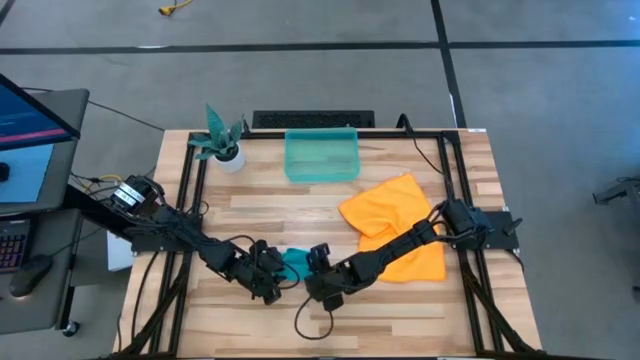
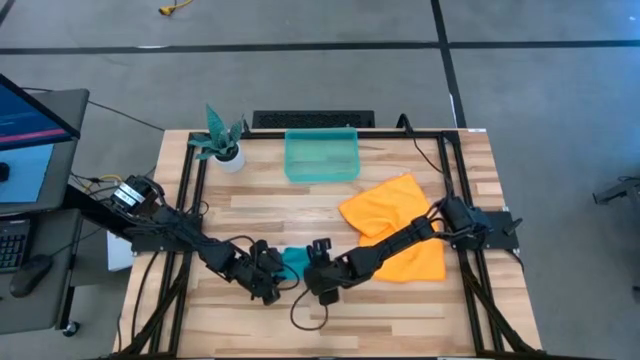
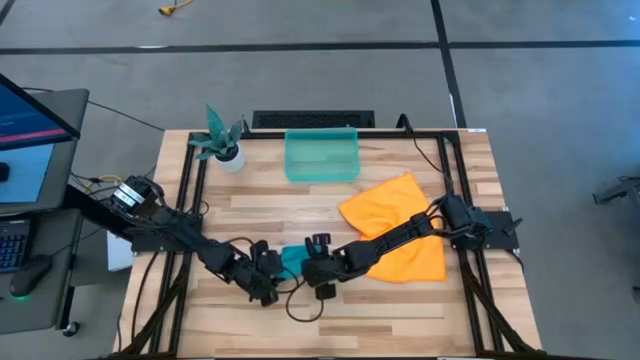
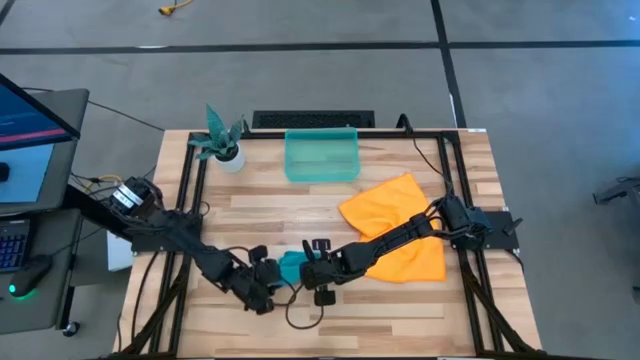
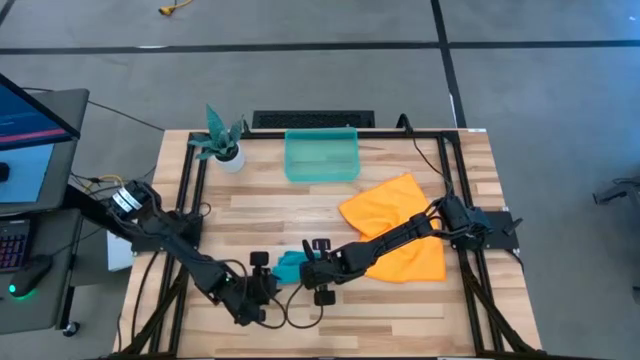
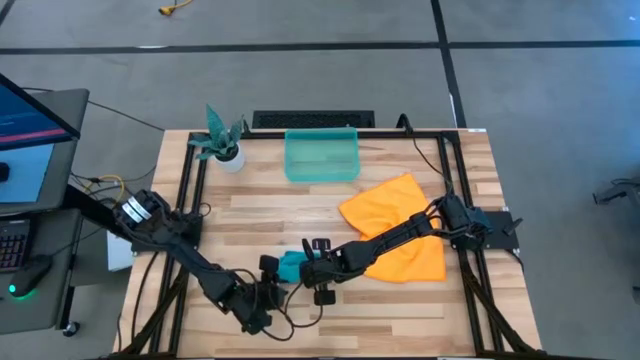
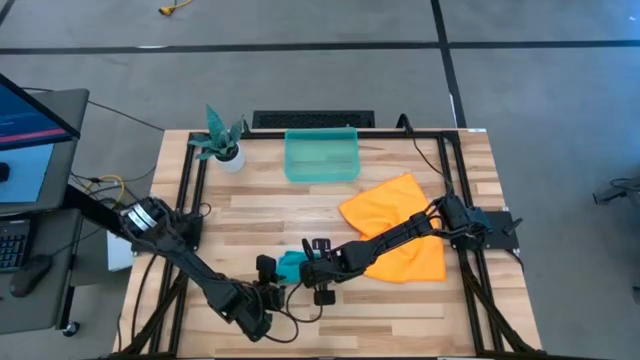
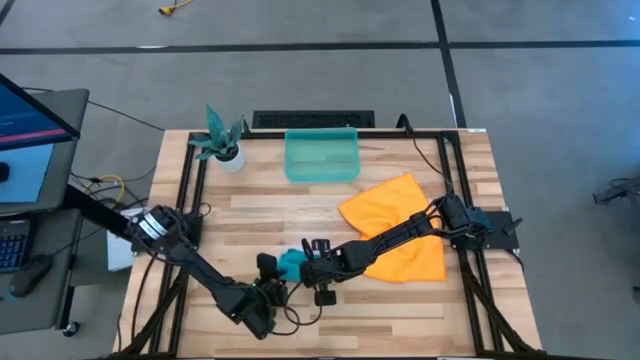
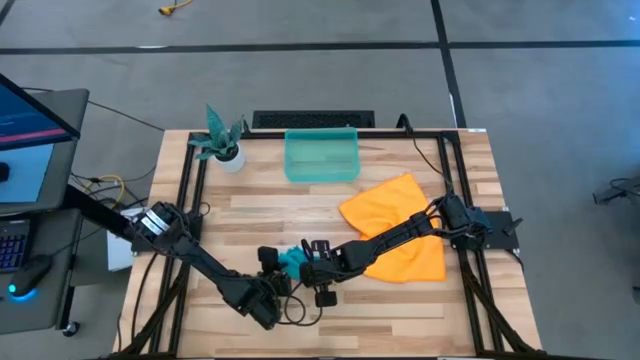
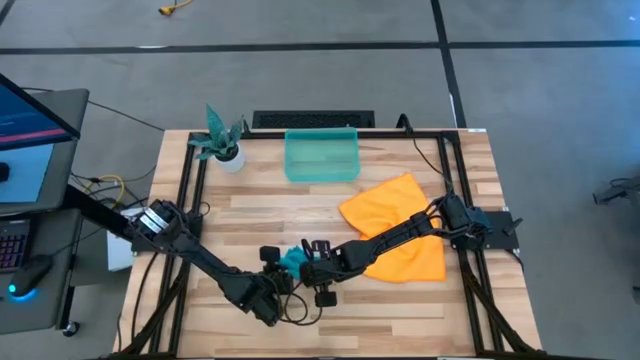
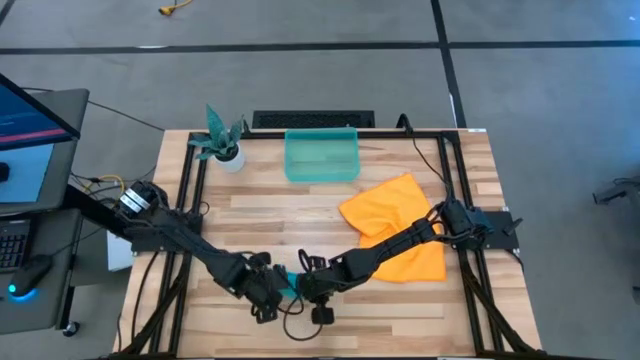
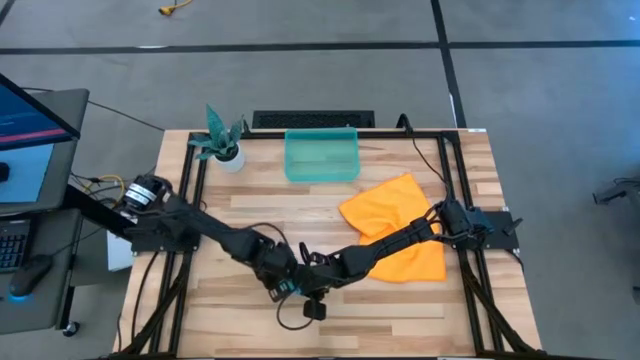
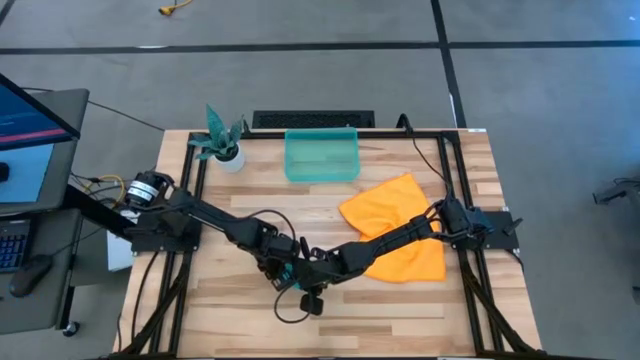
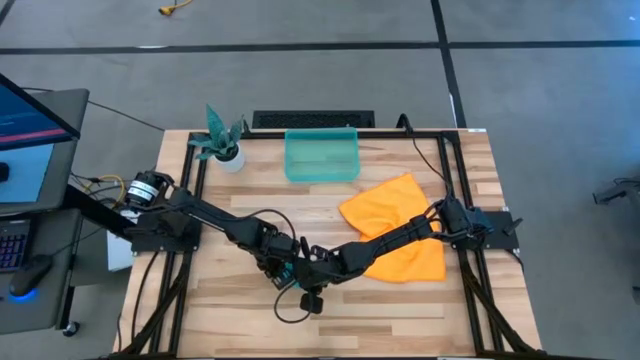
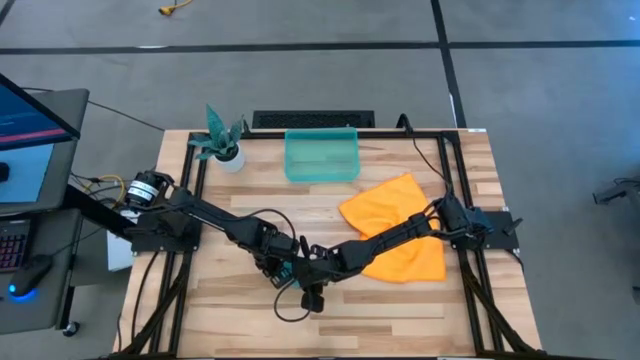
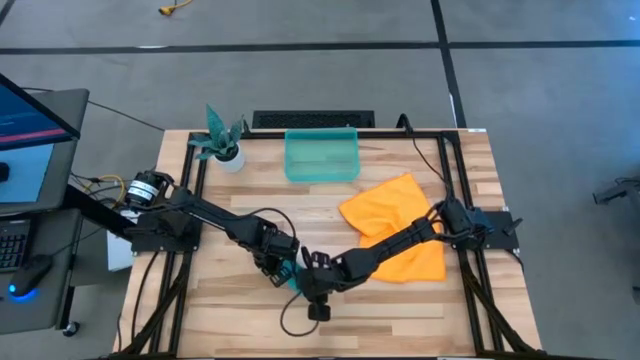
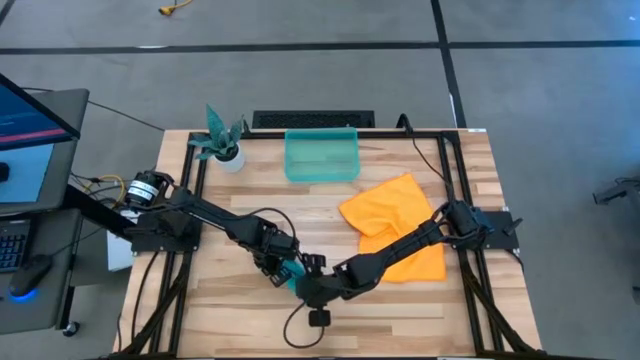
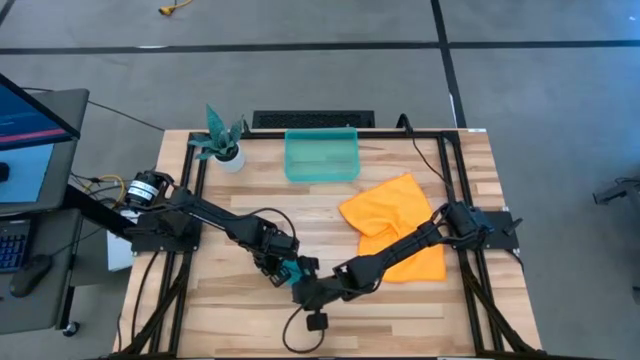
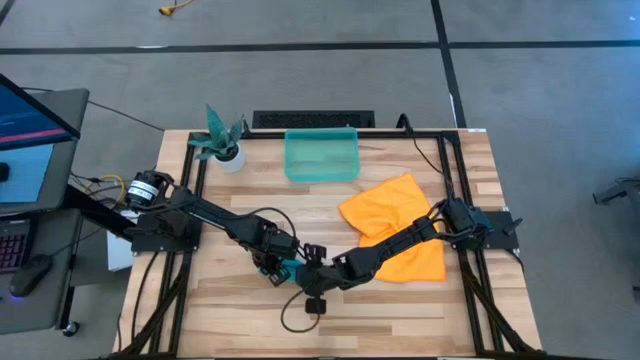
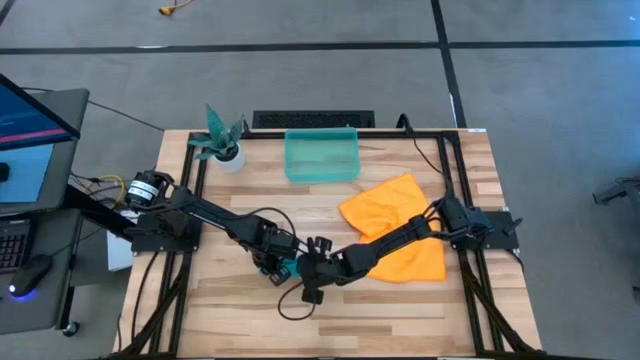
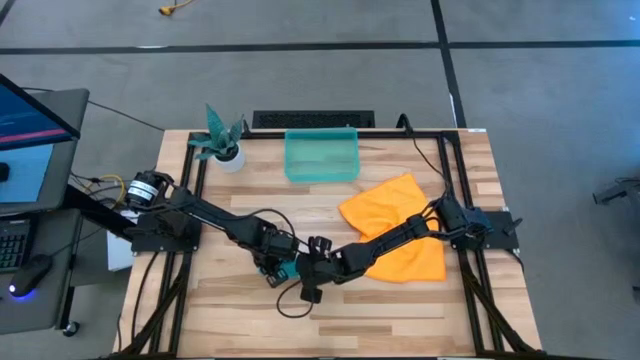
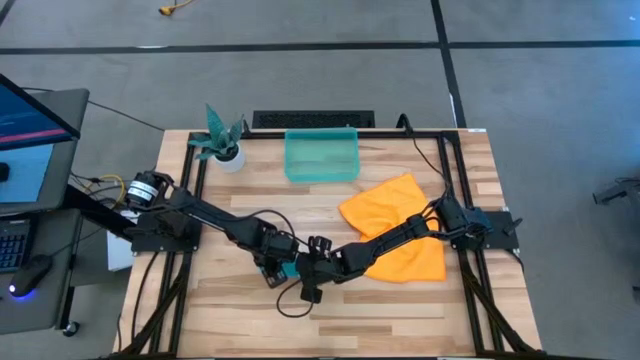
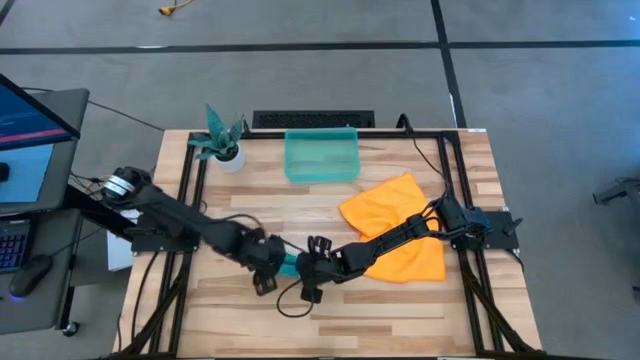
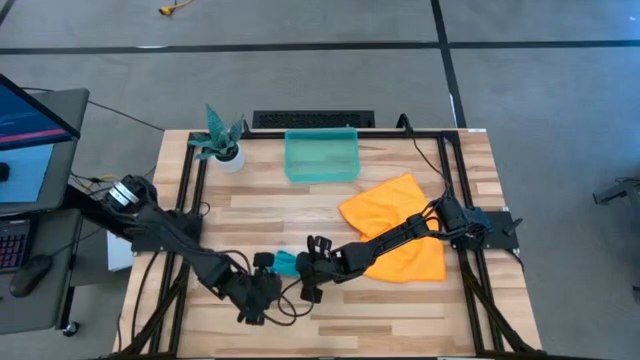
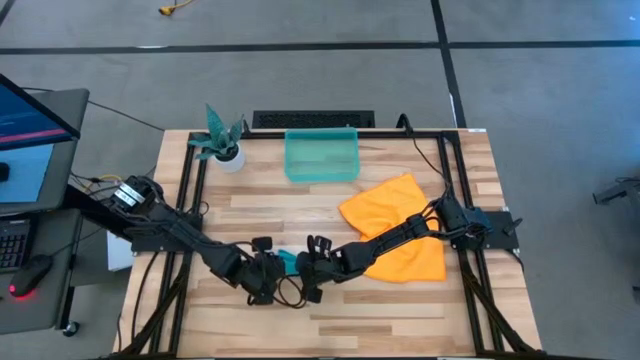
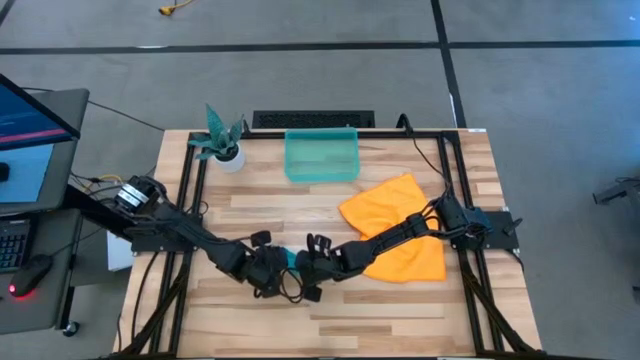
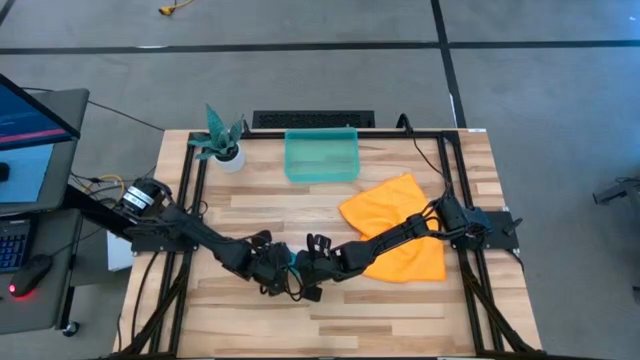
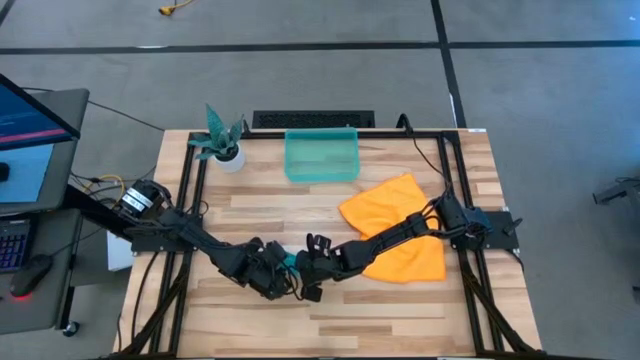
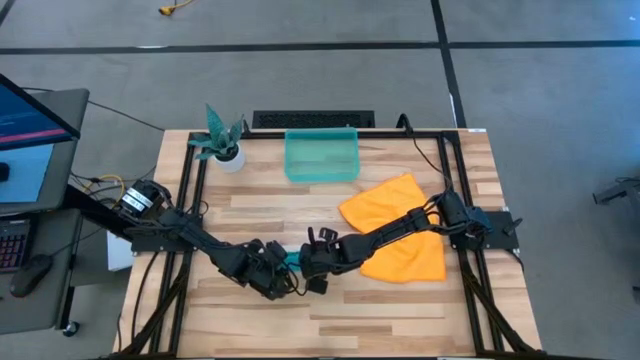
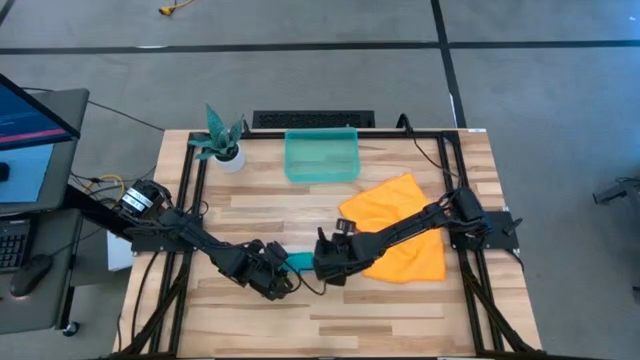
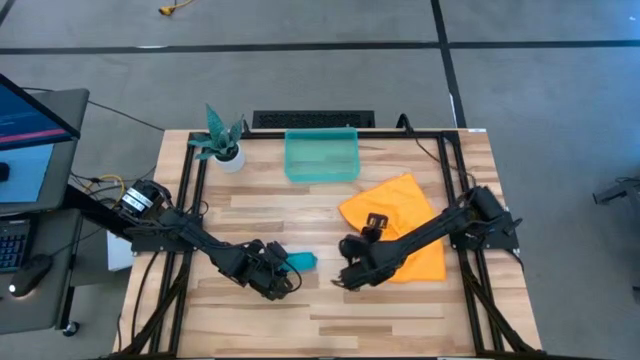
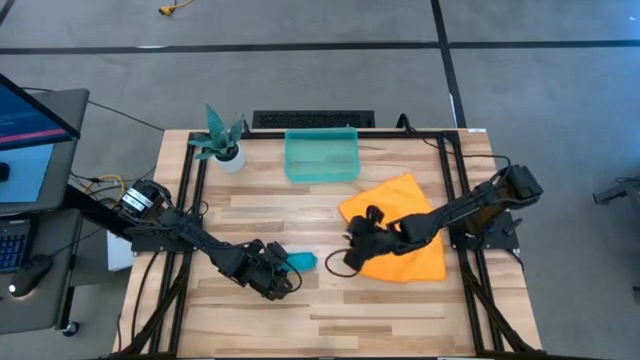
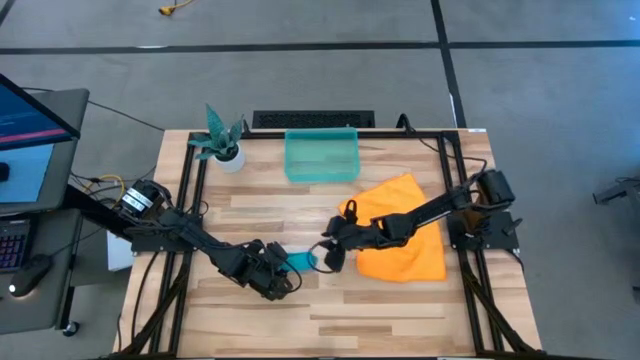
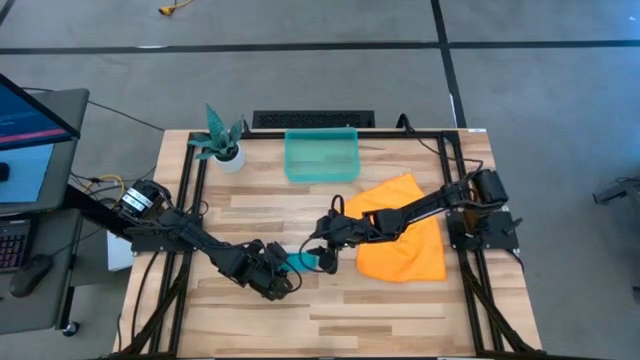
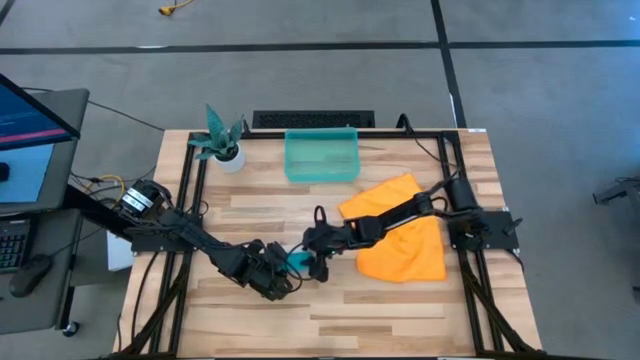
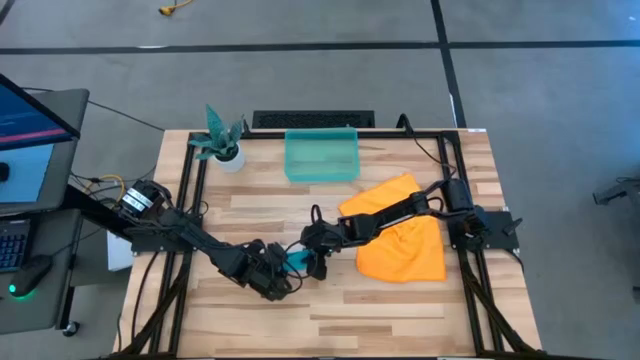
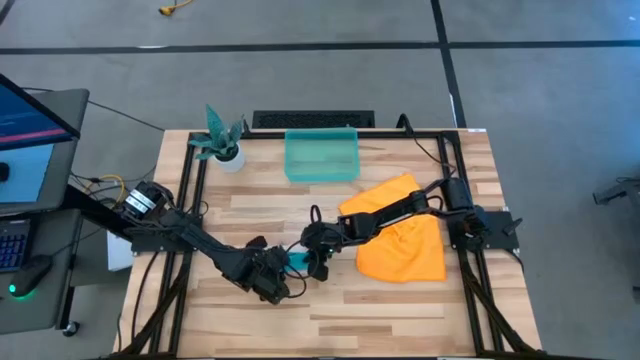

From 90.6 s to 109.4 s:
Task: Roll microfiber towels into tight, uniform cylinder then place into a basket
Roll the blue microfiber cloth

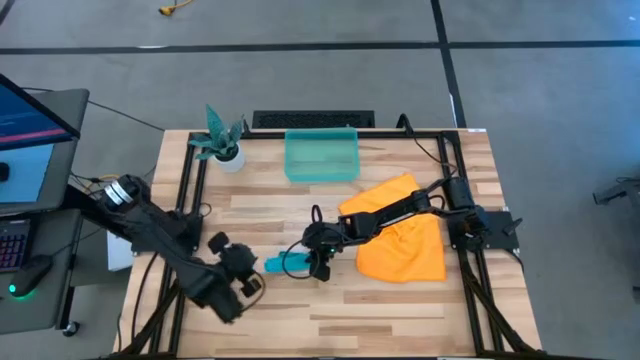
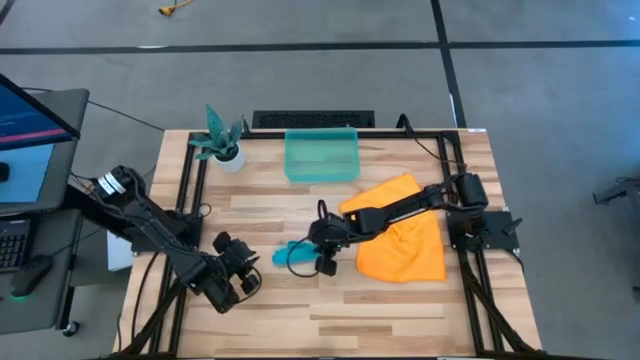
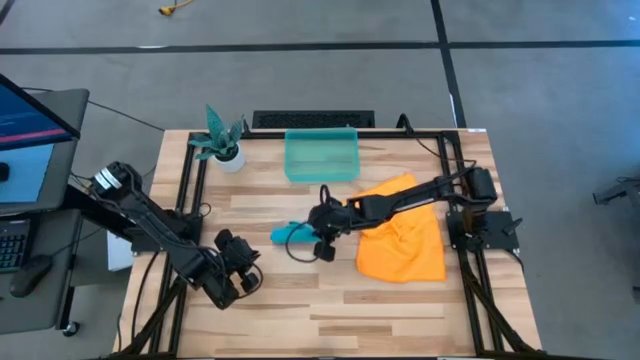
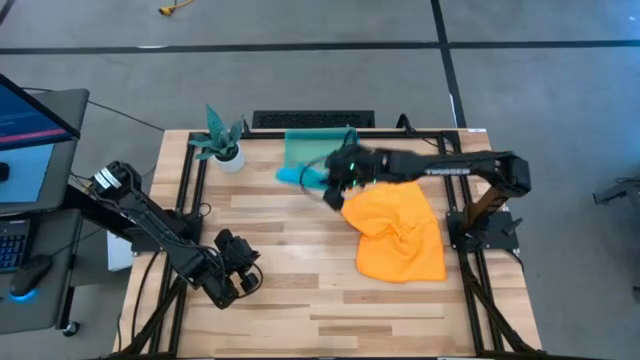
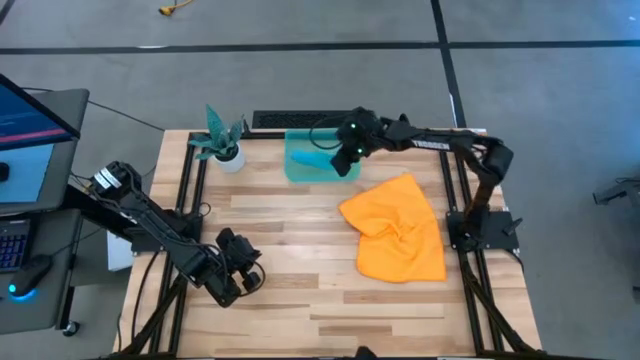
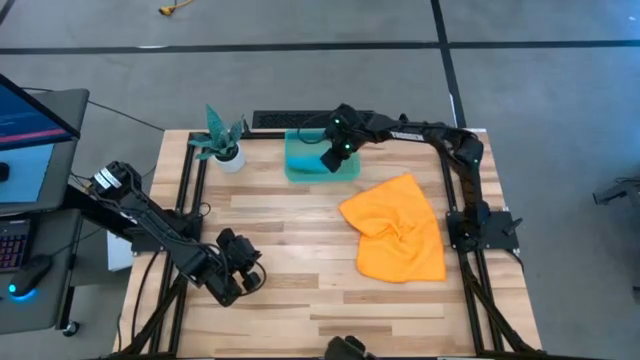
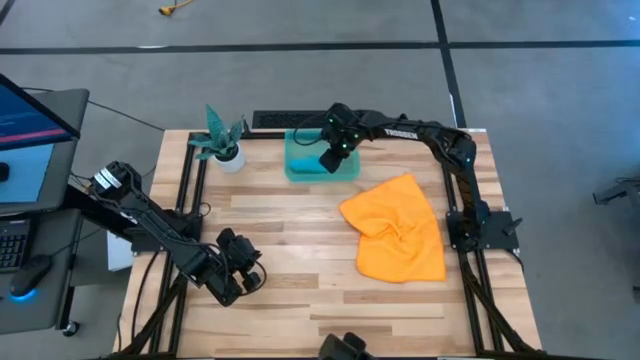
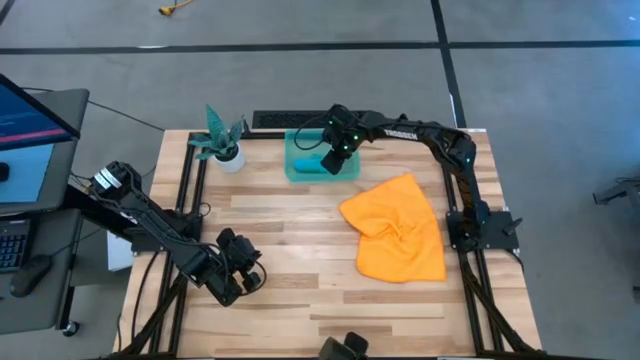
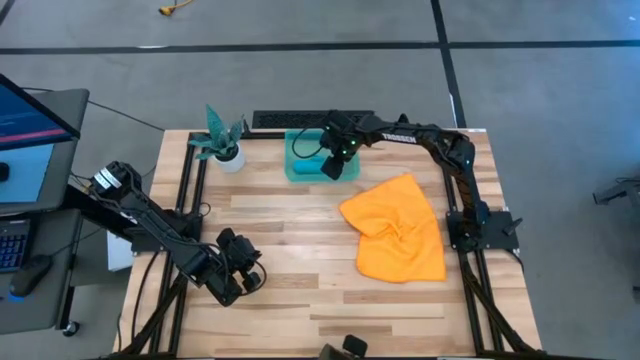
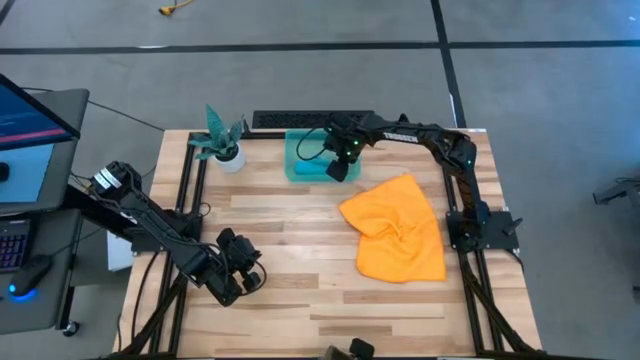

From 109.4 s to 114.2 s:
Put the rolled blue microfiber cloth into the green bin
